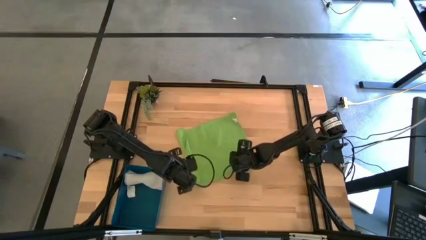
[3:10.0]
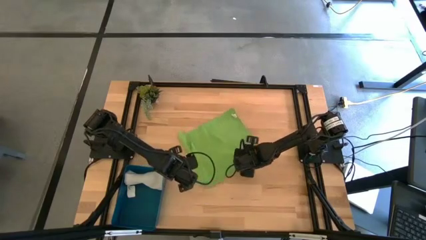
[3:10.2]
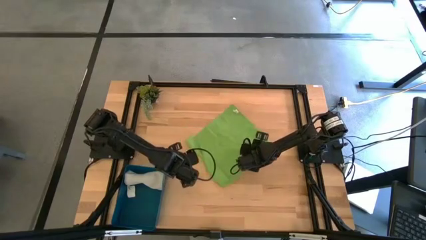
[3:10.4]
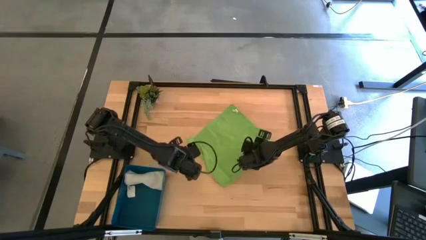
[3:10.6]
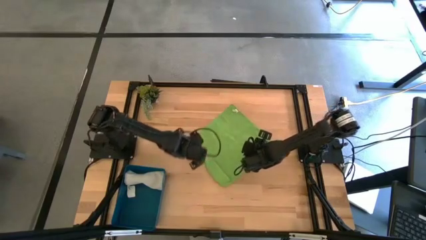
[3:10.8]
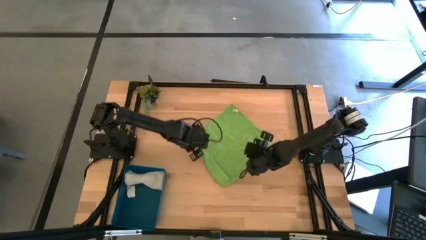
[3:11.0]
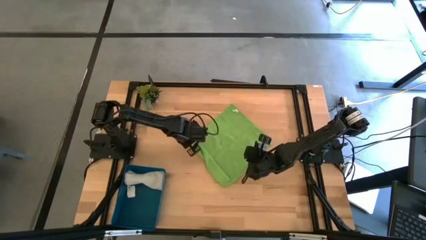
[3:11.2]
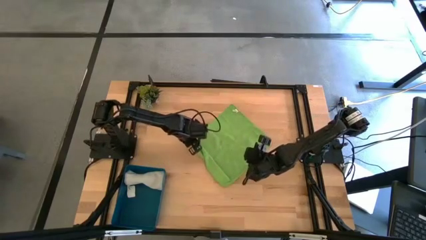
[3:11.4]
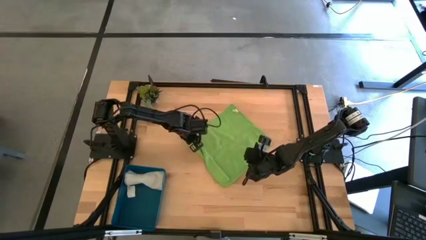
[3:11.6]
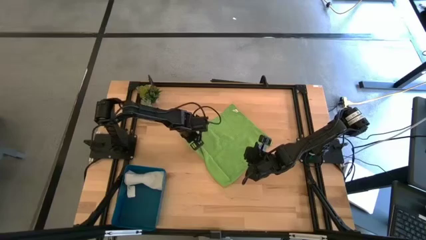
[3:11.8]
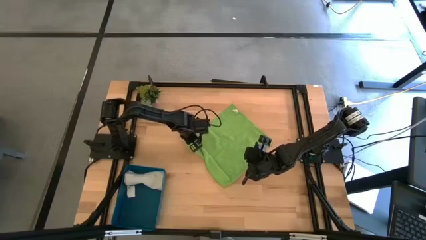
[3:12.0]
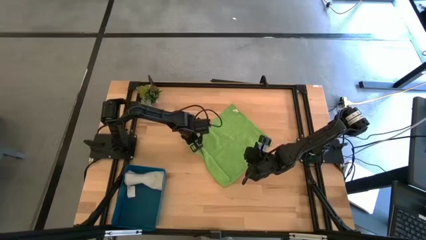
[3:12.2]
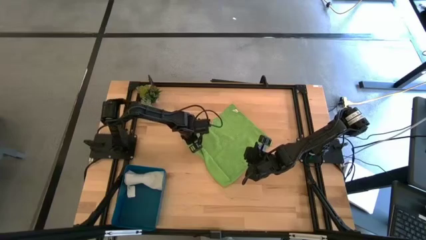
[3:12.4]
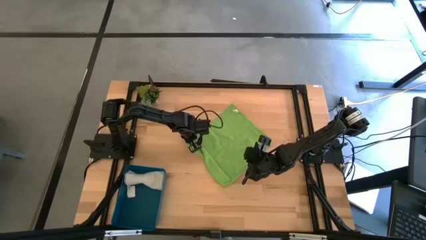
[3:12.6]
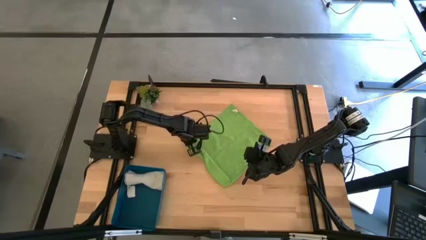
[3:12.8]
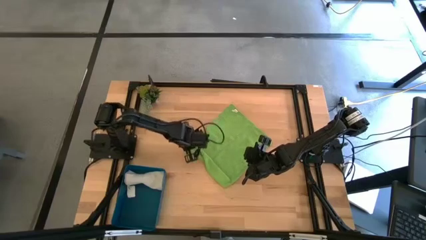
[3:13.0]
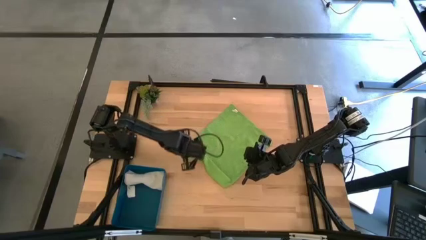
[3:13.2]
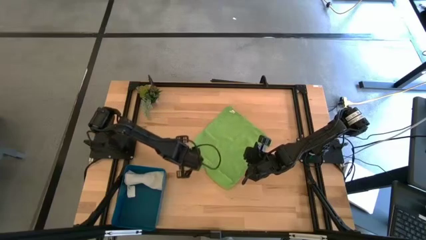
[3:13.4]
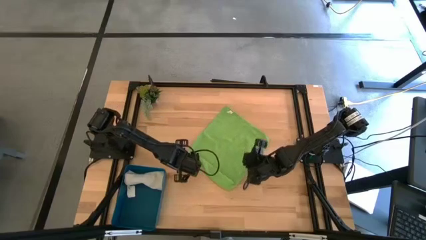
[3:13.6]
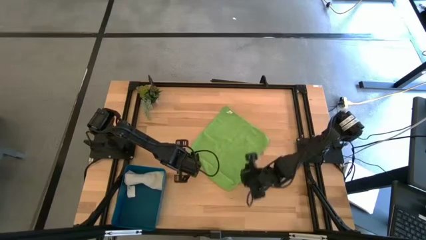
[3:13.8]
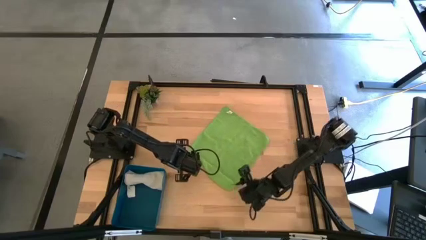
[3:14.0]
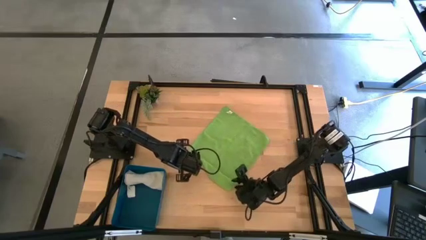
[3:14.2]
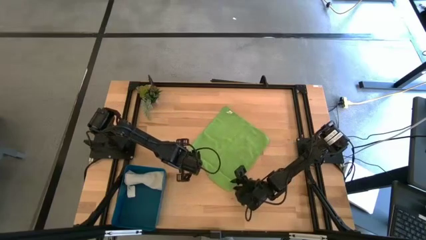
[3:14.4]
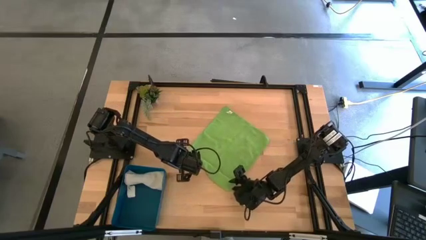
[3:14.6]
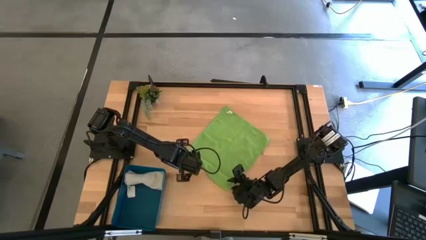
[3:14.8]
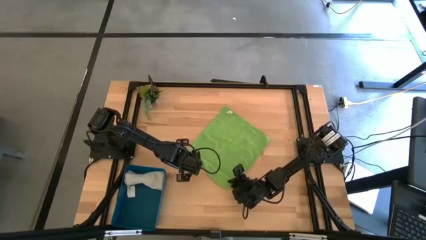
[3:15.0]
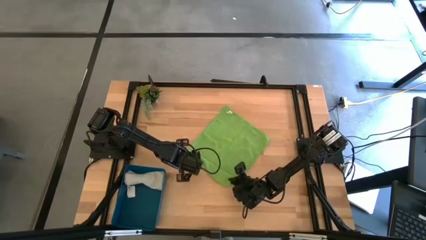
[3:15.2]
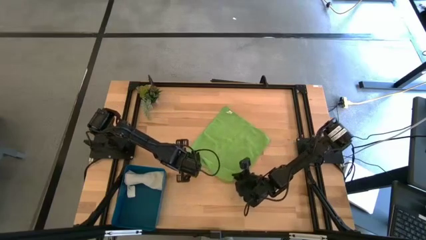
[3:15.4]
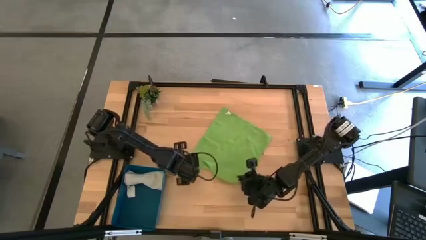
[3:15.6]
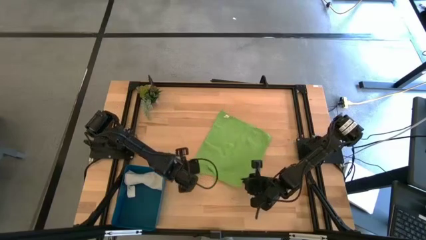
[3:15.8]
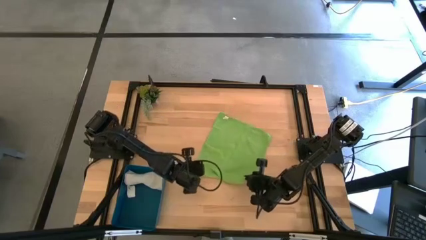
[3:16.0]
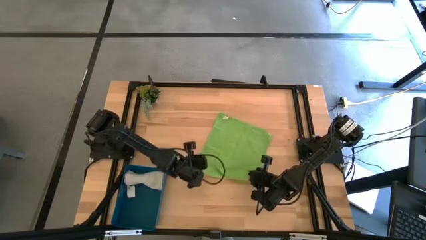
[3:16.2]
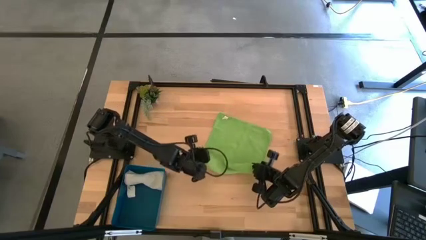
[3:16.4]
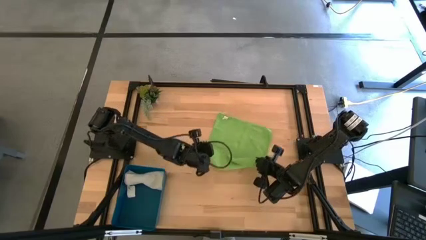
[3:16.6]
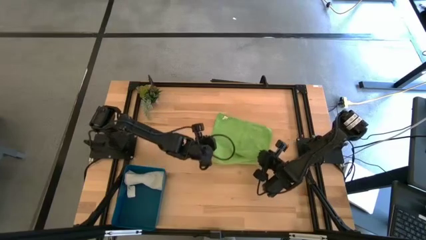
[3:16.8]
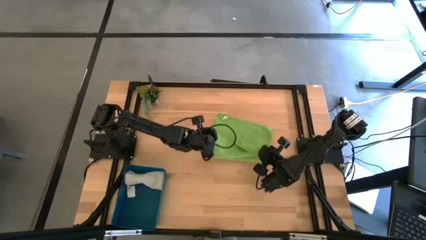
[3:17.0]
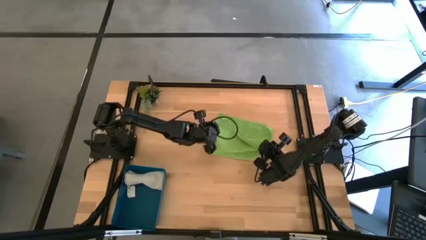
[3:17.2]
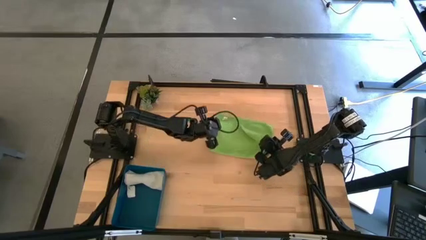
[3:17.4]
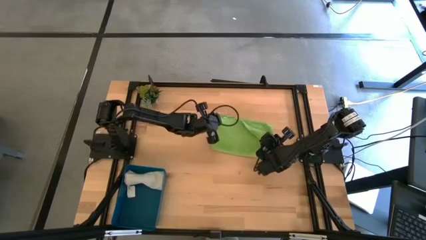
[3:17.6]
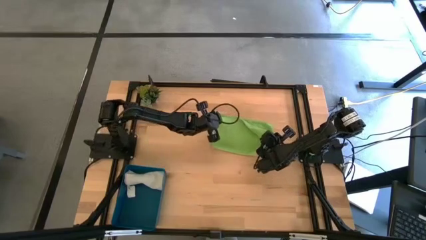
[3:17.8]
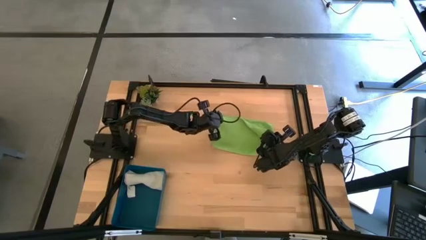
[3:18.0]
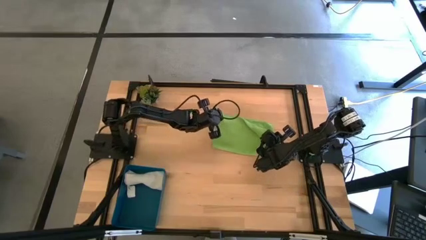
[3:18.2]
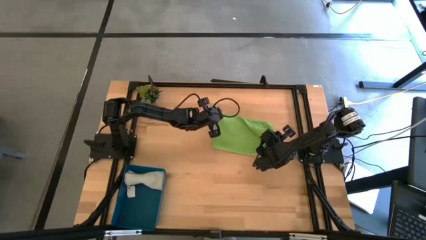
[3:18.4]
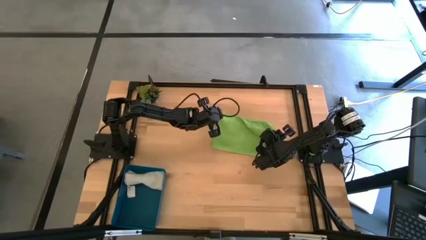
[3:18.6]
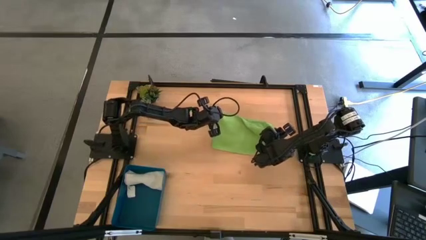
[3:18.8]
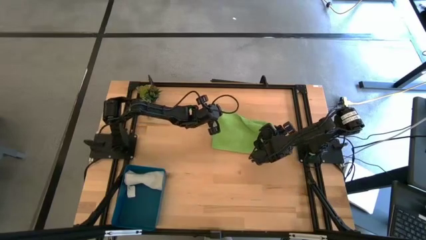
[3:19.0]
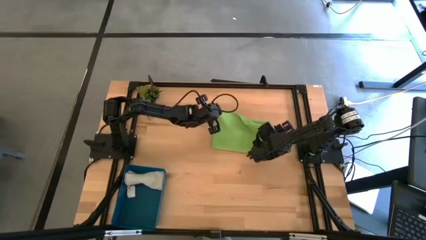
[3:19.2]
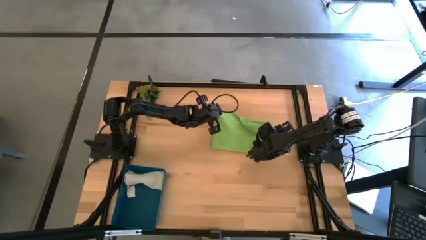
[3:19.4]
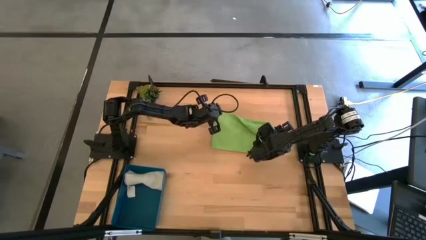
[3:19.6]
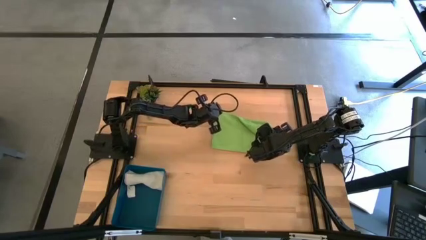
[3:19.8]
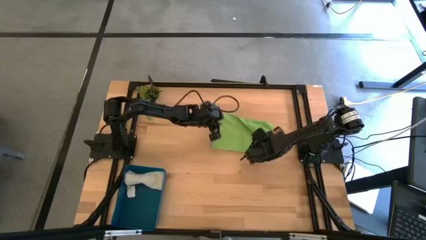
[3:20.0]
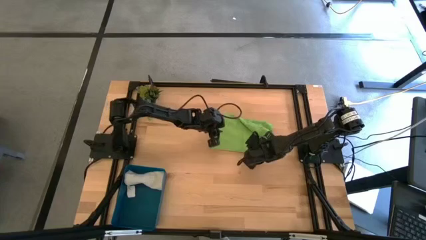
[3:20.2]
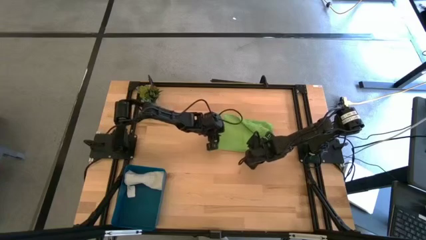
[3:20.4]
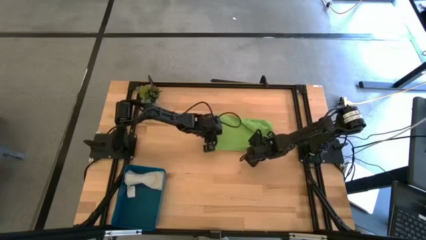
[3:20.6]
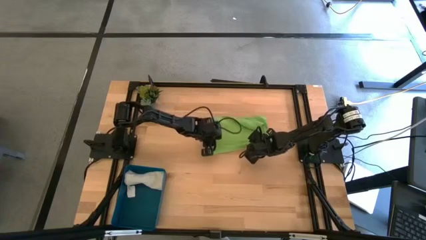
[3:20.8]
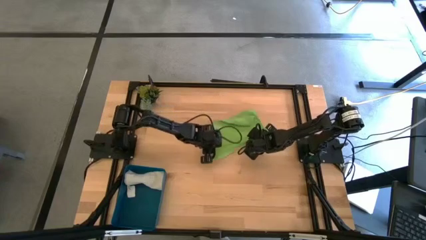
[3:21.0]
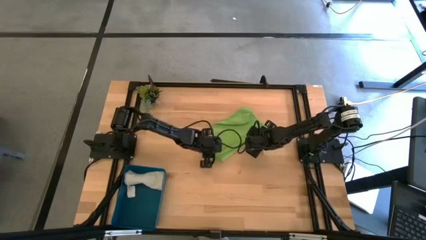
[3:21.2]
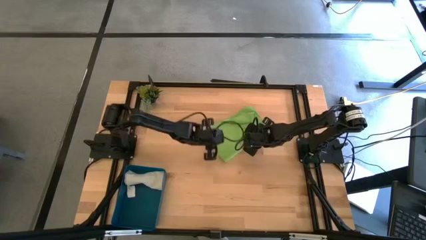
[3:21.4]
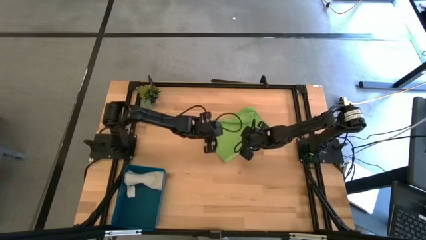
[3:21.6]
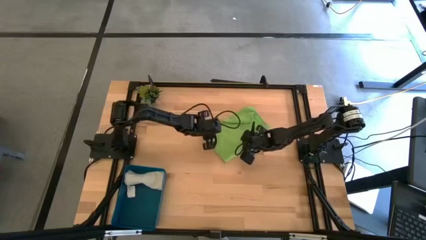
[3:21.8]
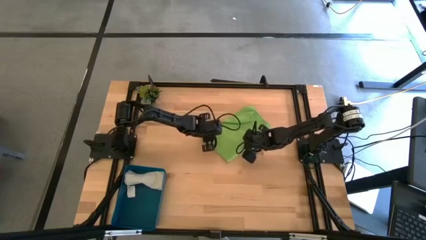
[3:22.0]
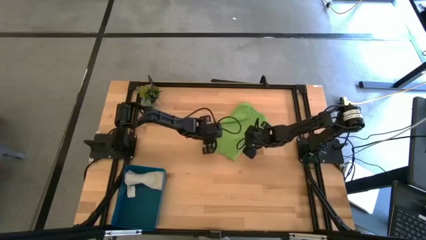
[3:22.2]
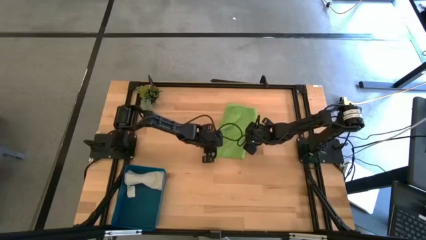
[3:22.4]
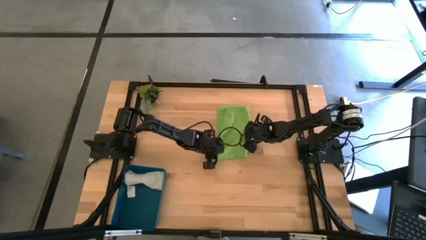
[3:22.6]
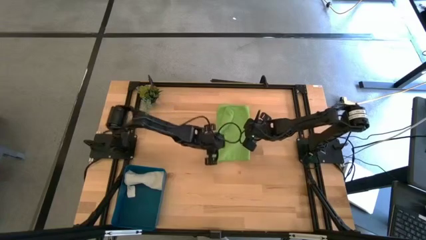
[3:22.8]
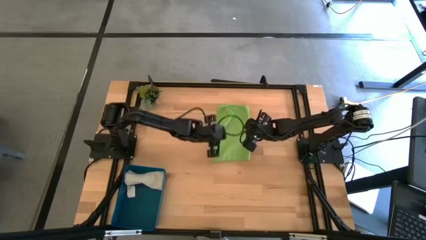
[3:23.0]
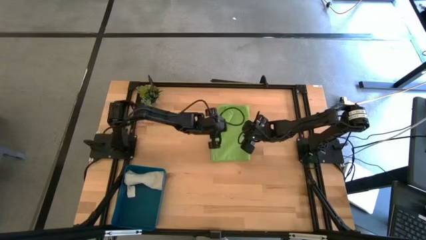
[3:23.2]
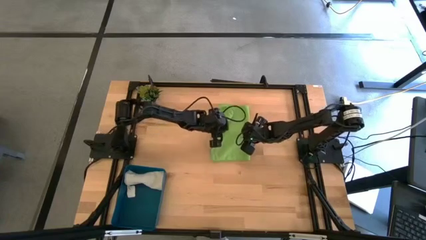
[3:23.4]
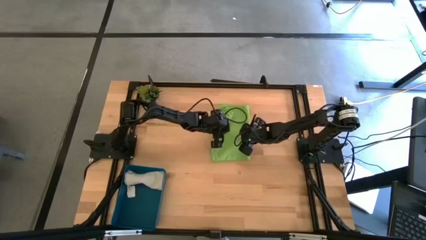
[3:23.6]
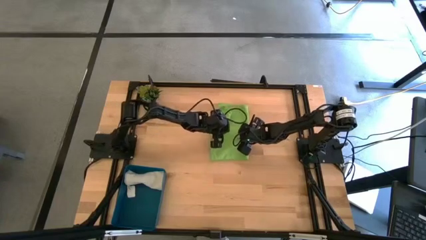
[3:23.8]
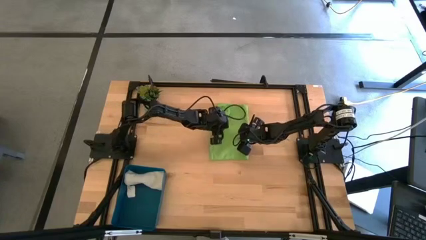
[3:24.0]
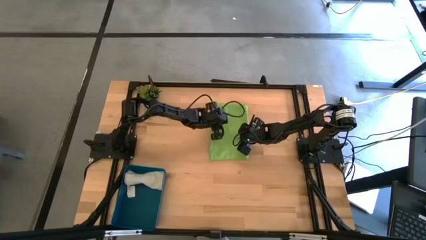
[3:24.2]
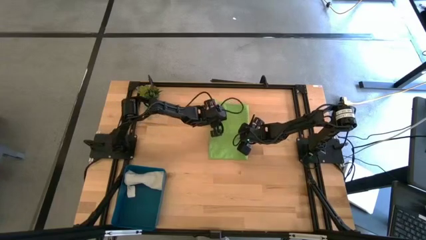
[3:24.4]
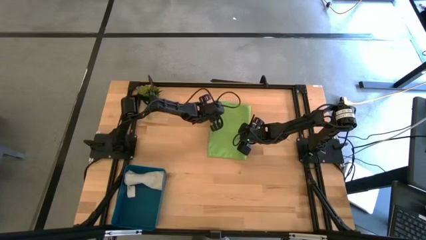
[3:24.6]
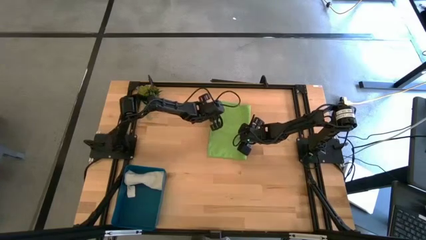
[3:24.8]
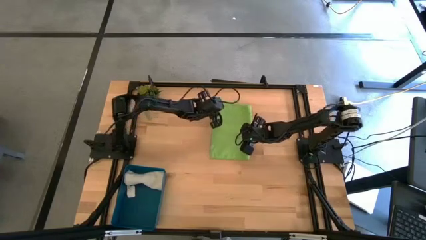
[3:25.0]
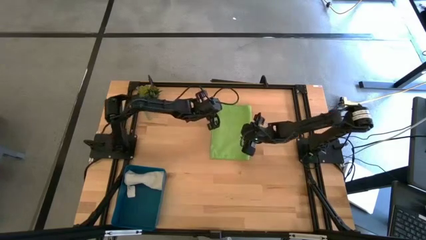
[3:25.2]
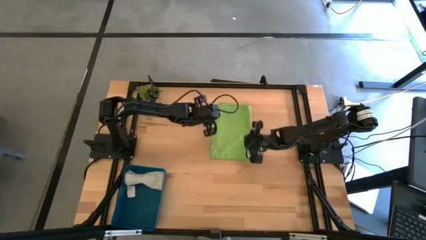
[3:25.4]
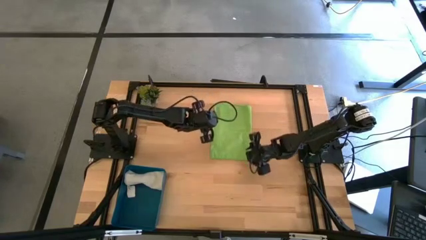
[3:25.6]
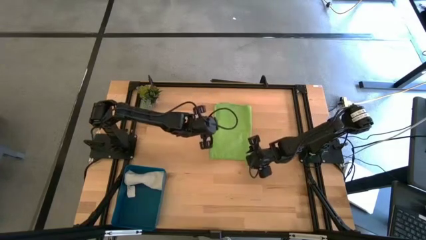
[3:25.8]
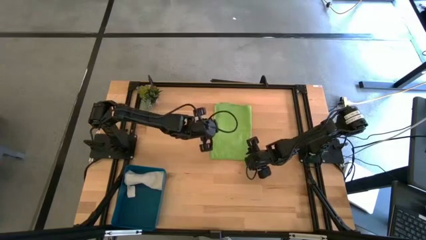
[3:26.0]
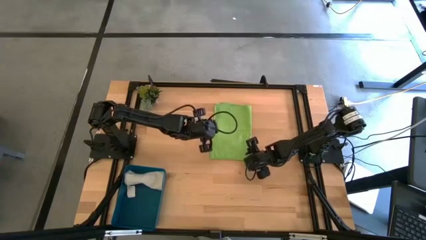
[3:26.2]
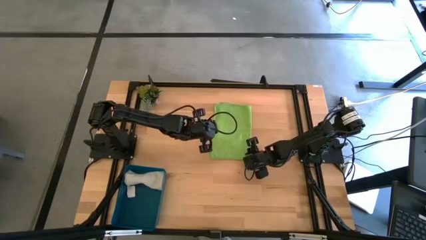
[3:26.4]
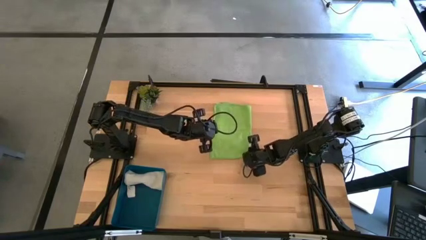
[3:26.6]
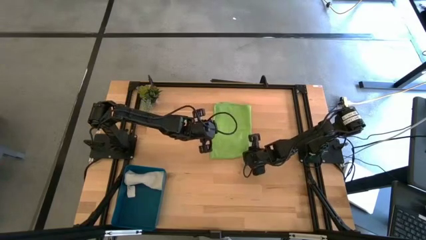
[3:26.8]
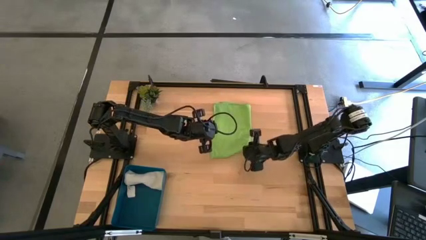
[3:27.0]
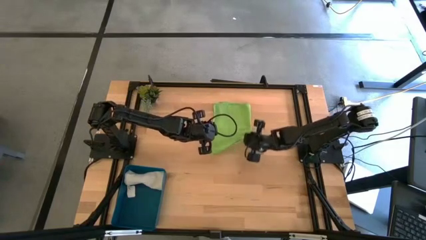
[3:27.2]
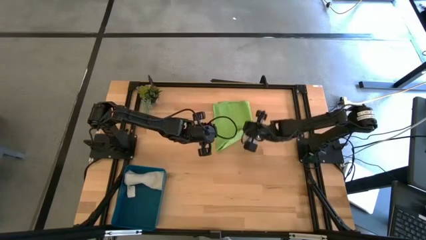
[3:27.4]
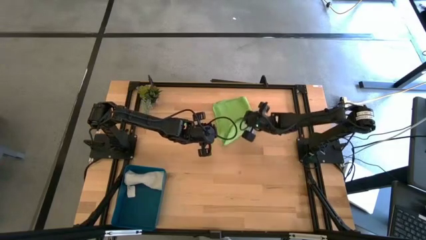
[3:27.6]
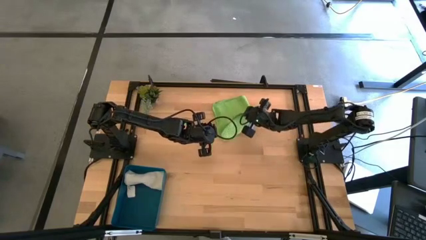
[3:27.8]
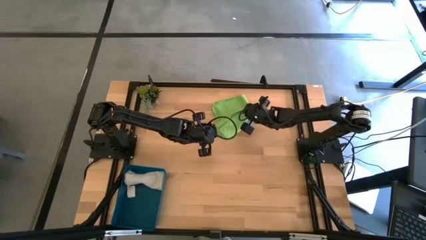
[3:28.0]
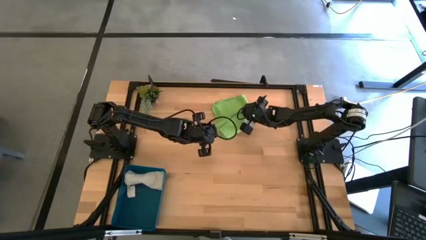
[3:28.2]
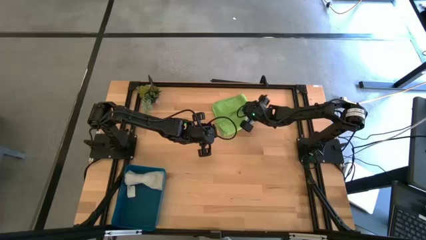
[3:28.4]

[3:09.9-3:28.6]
Task: Roll microfiber towels into tight, uniform cylinder then place into a basket
Roll the green towel
